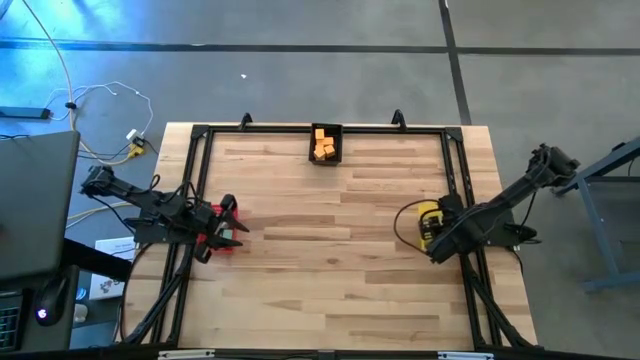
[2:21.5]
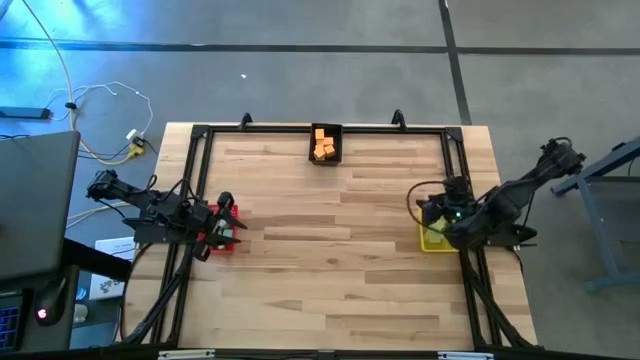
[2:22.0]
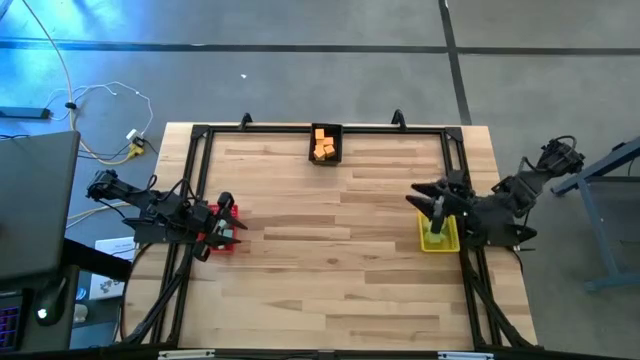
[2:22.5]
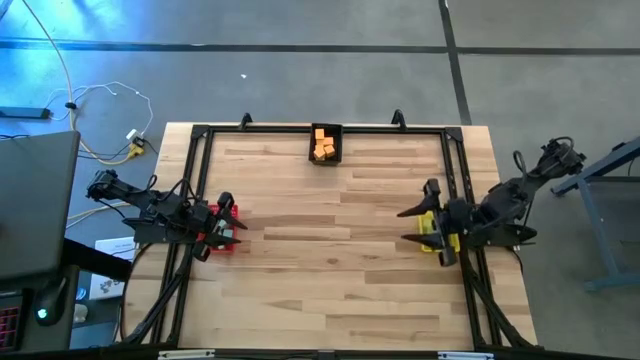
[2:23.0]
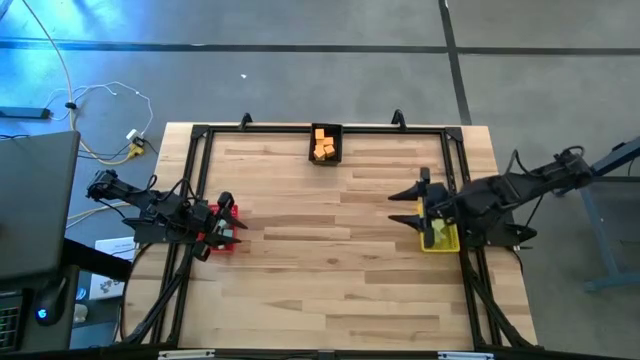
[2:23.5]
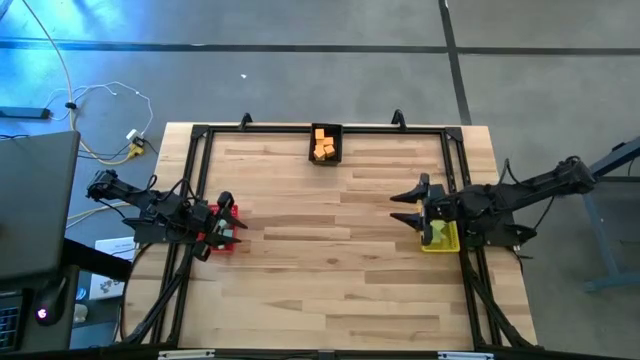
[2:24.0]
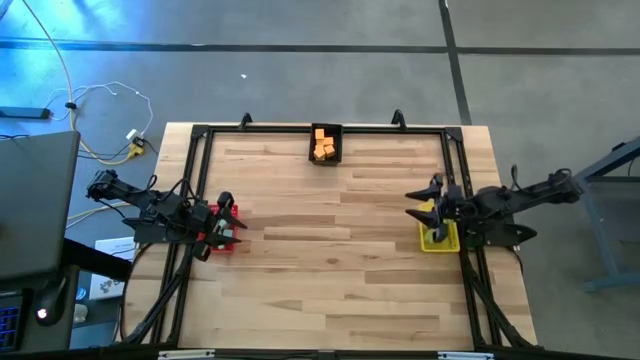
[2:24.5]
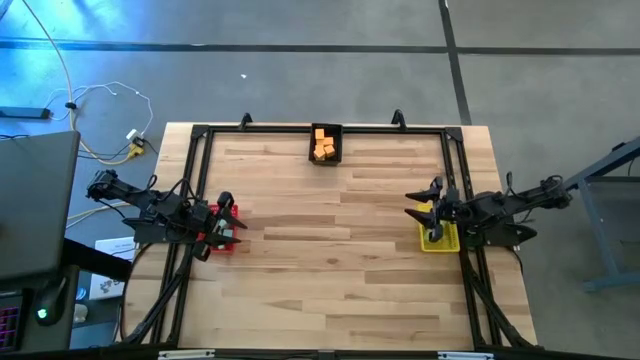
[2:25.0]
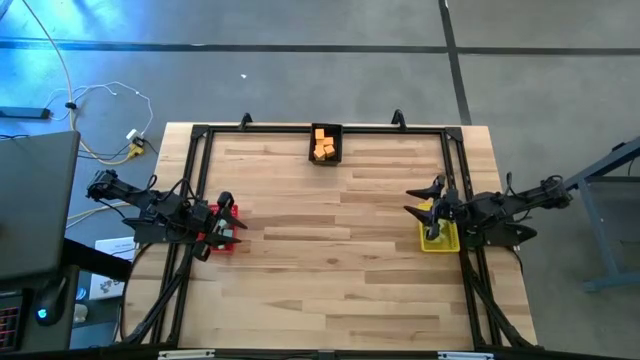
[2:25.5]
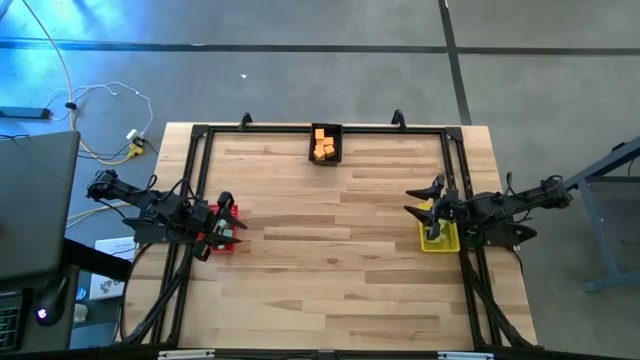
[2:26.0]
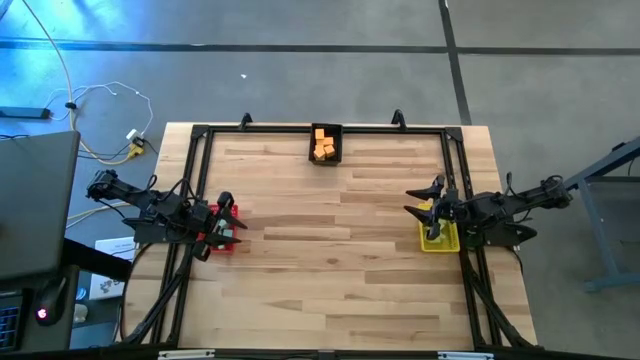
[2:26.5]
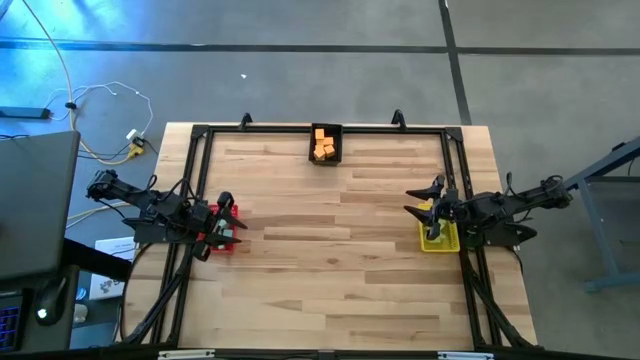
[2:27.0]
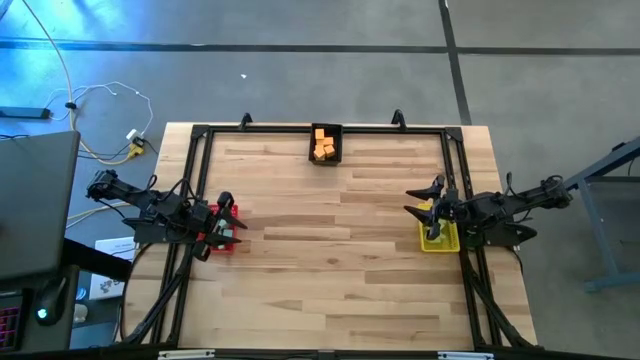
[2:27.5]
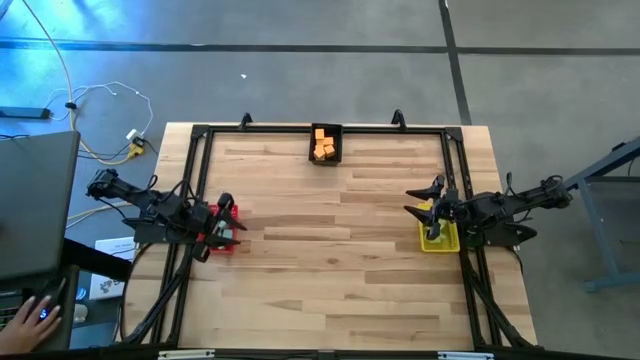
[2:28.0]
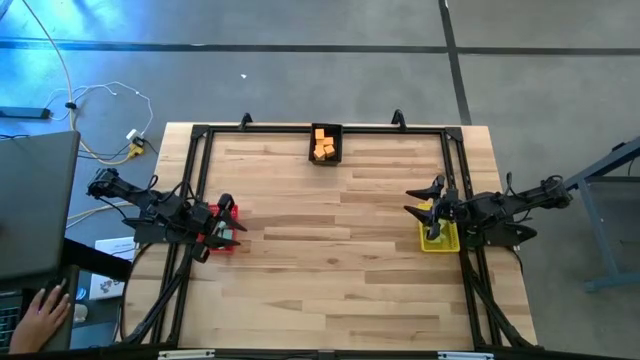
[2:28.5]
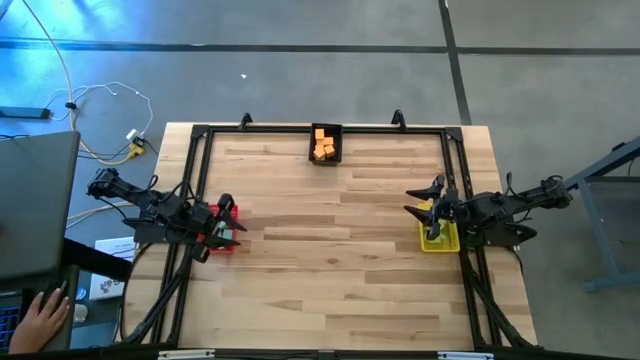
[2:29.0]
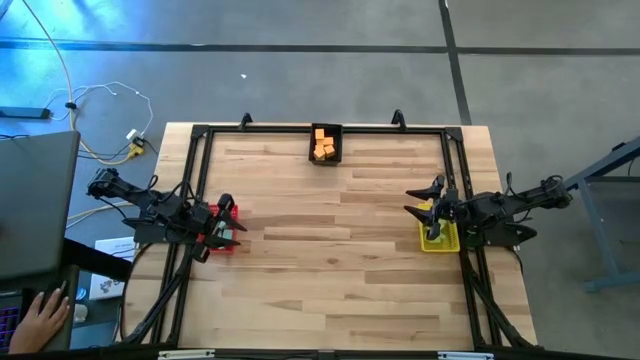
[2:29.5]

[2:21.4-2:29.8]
Task: Sort & place blocks by color
Return to Home Position

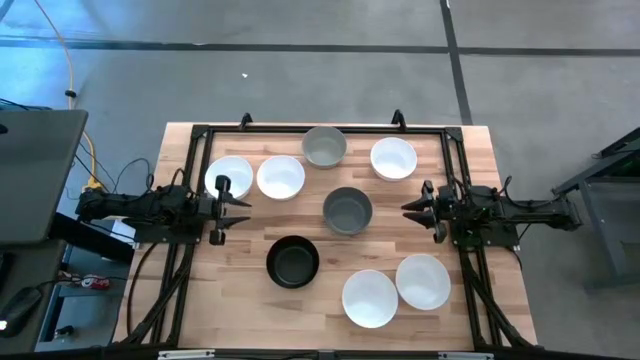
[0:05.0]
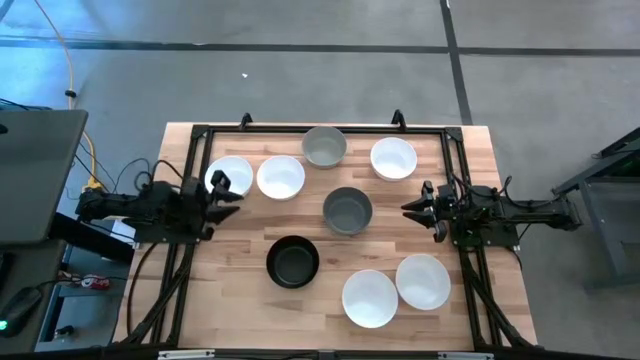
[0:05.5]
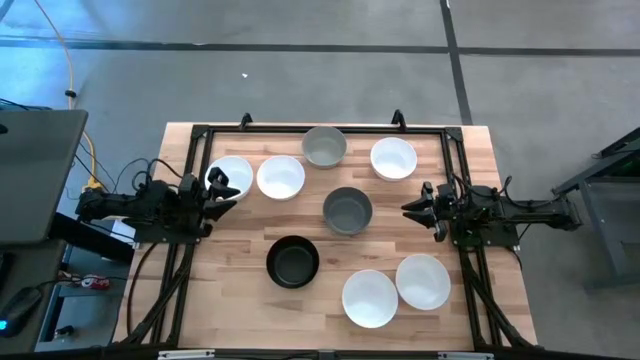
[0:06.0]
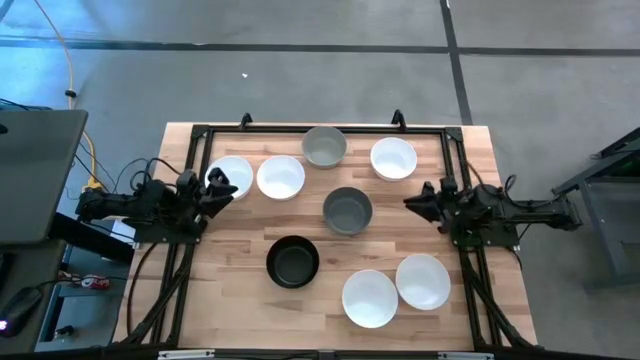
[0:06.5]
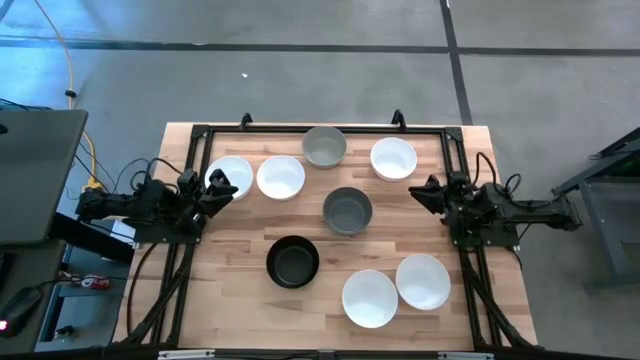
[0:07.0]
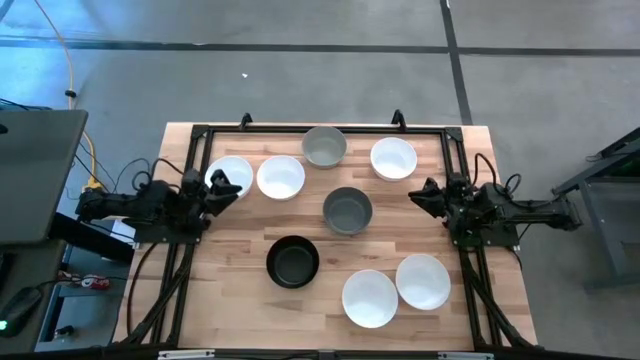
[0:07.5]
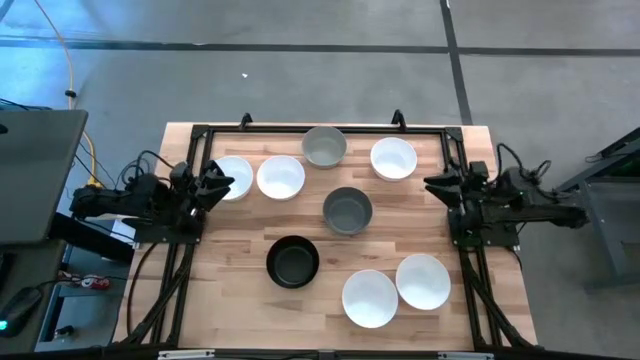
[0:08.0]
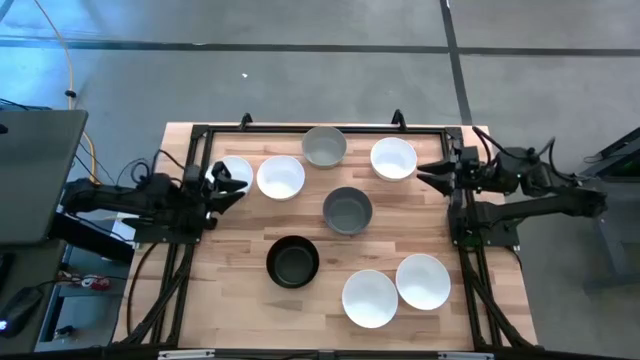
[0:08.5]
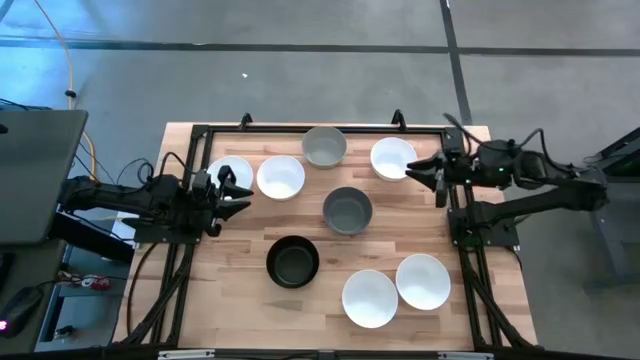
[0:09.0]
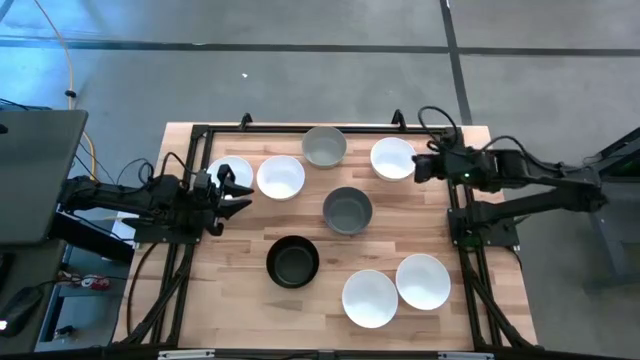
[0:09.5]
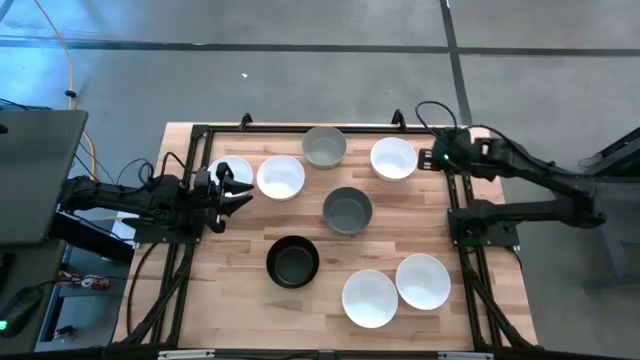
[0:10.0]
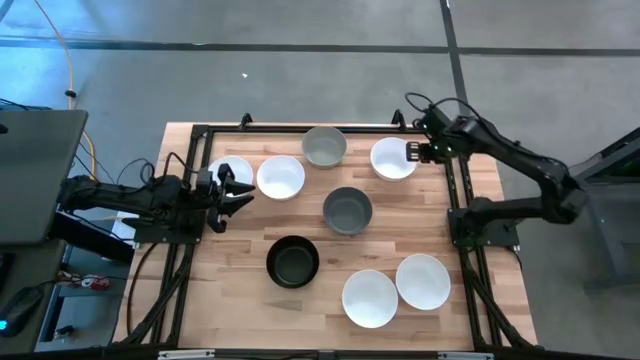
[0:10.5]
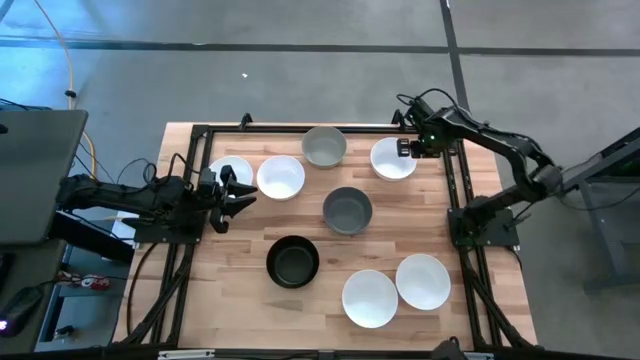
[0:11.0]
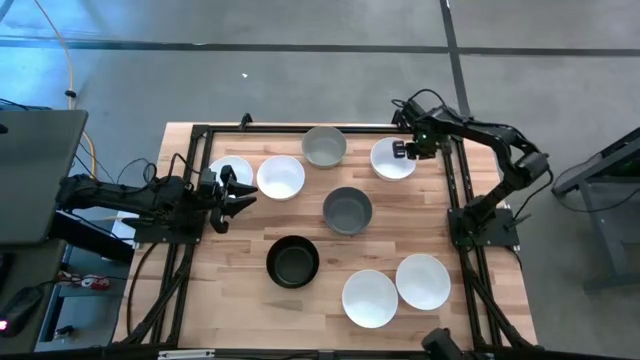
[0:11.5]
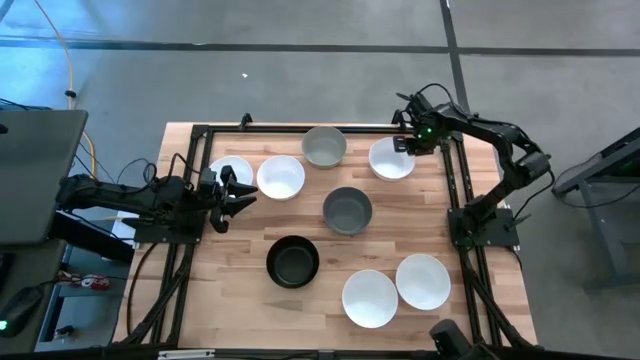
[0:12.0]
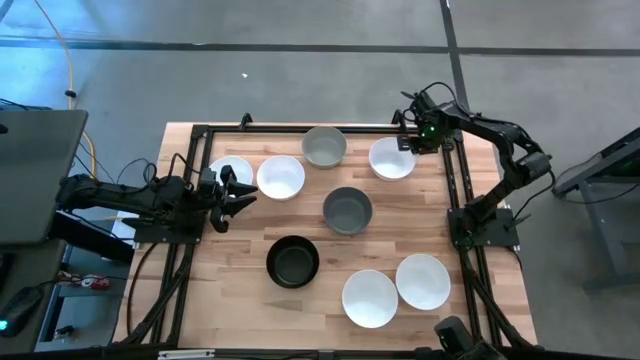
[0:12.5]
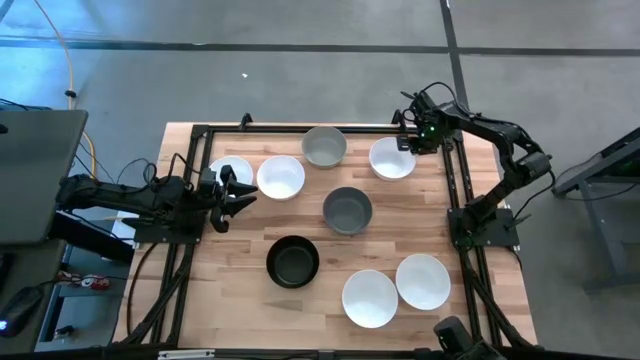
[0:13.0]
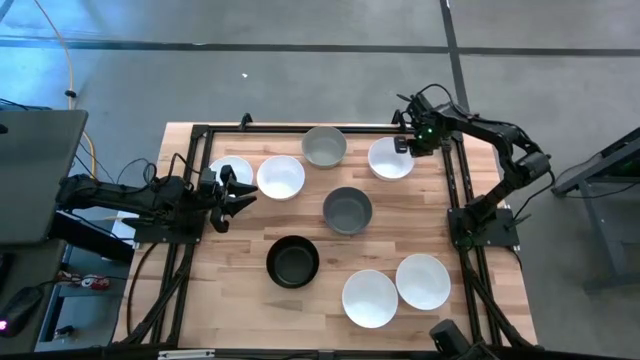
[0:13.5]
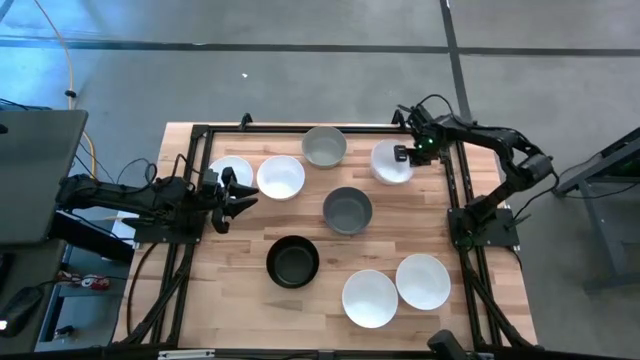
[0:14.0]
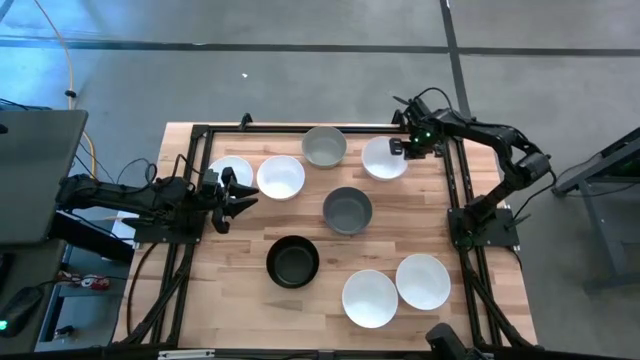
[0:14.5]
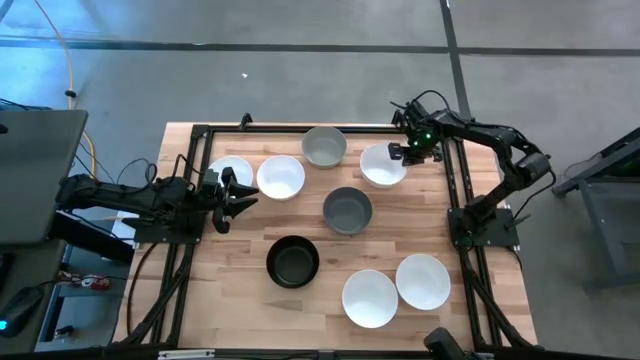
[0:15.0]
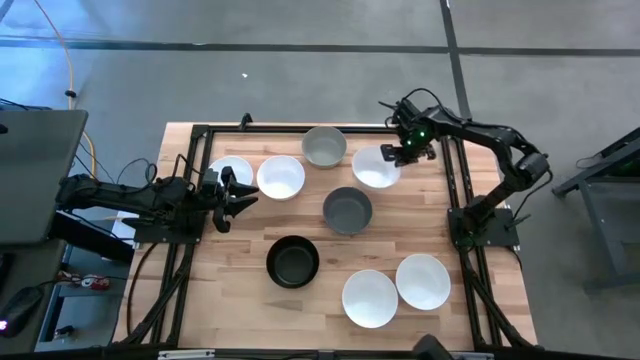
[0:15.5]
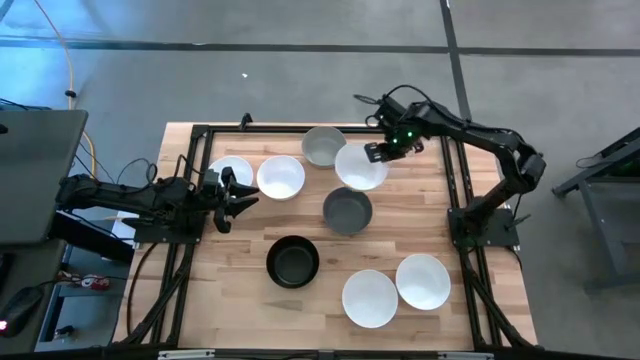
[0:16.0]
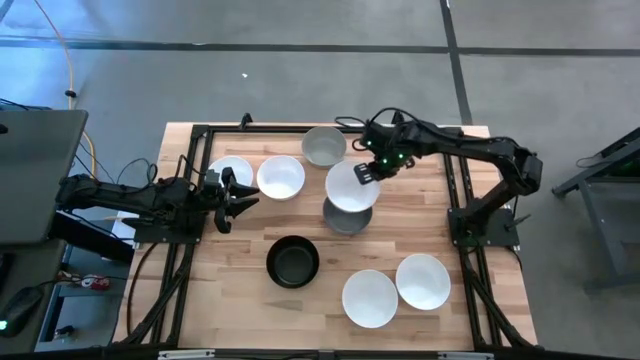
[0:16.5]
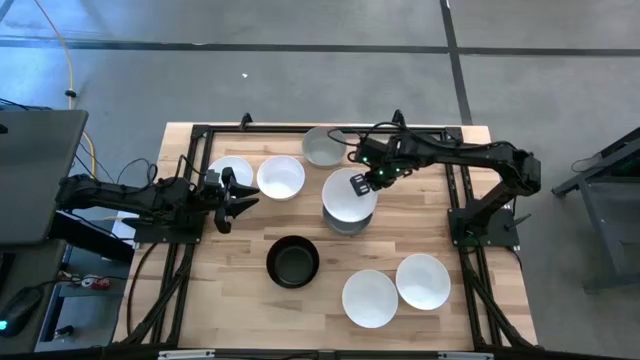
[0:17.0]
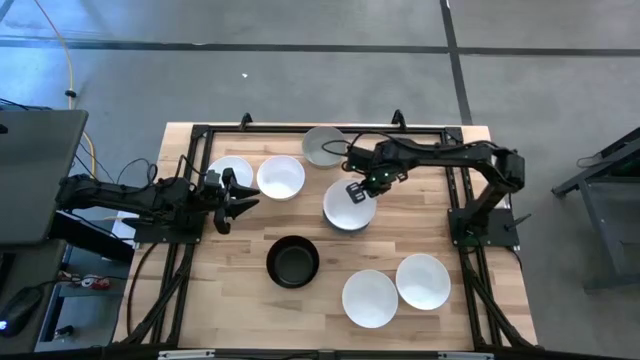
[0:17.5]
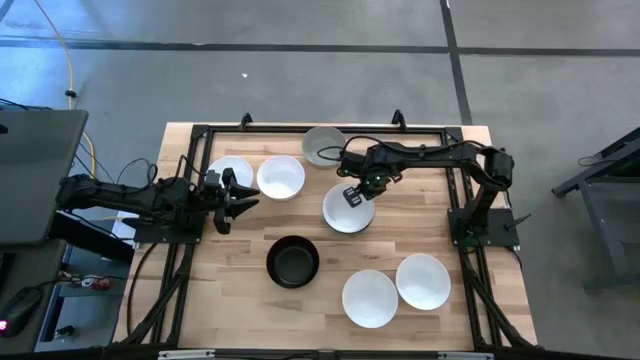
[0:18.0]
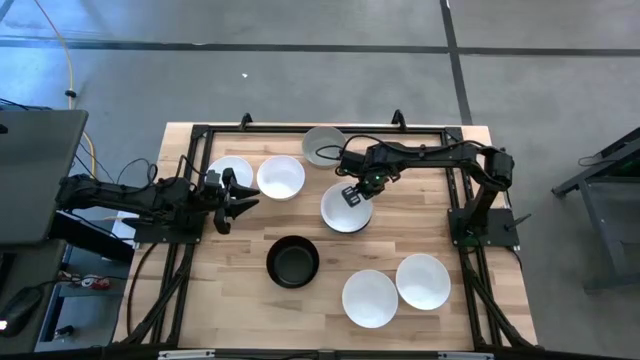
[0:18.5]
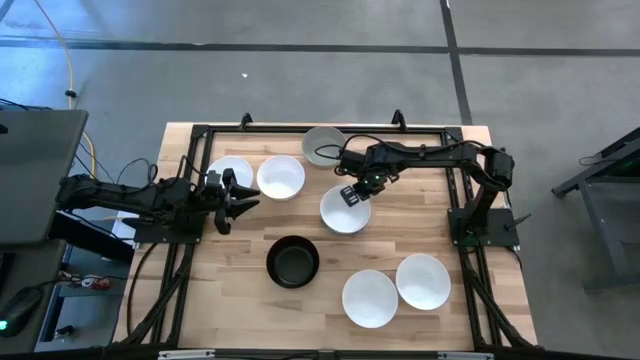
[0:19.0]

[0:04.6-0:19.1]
Task: Nest bowls inside each other
Stack the white bowl on top of the dark gray bowl
